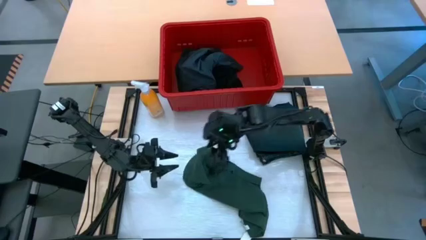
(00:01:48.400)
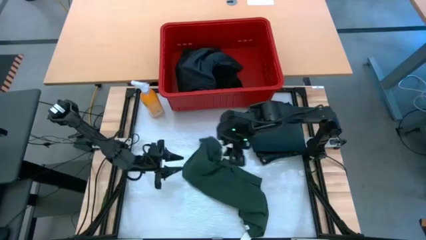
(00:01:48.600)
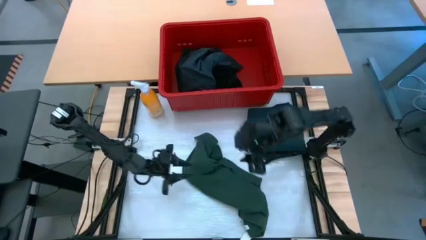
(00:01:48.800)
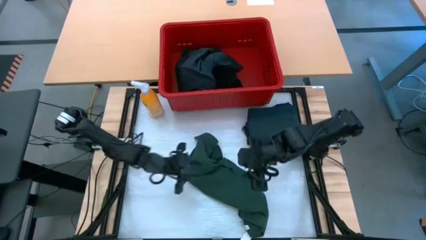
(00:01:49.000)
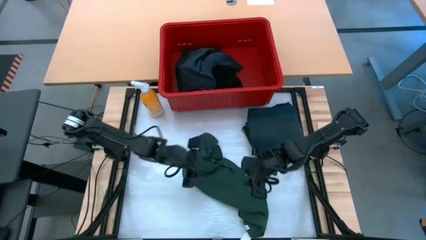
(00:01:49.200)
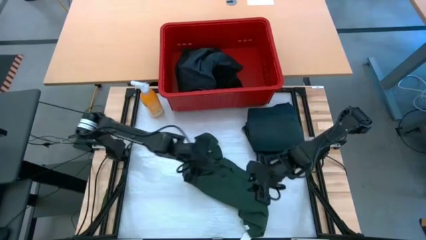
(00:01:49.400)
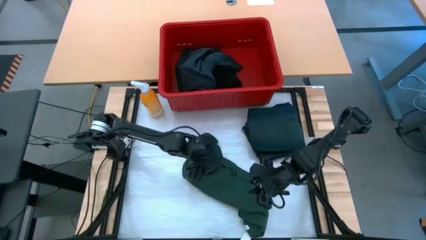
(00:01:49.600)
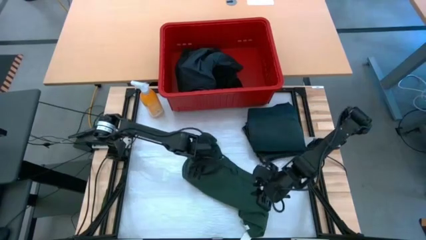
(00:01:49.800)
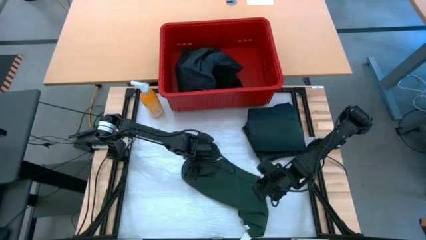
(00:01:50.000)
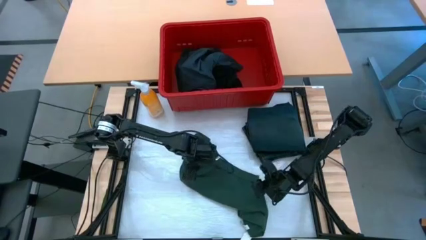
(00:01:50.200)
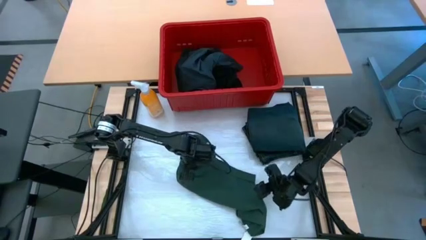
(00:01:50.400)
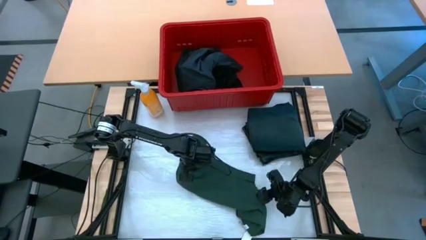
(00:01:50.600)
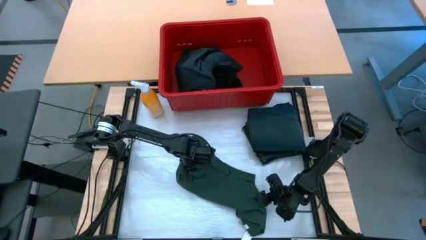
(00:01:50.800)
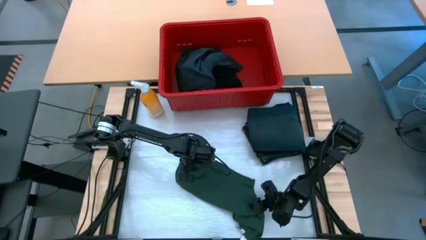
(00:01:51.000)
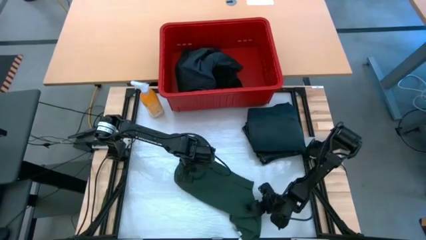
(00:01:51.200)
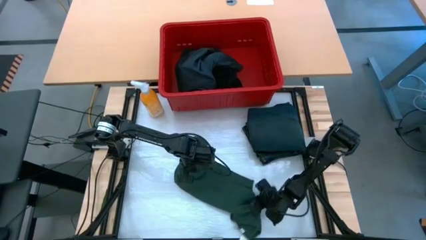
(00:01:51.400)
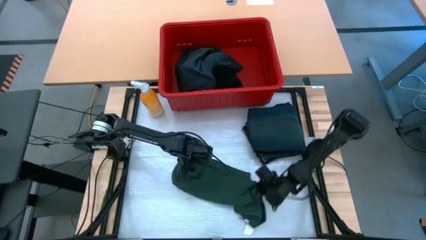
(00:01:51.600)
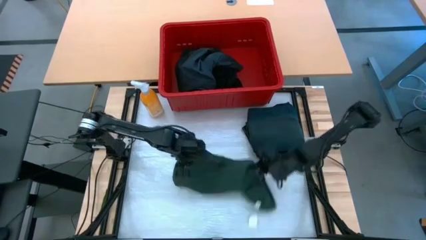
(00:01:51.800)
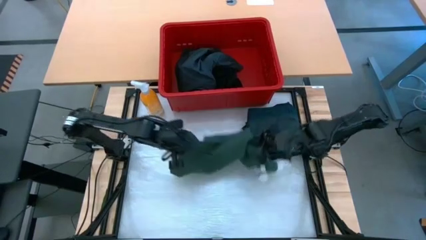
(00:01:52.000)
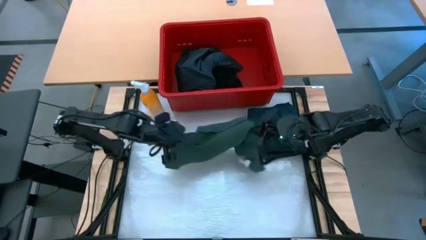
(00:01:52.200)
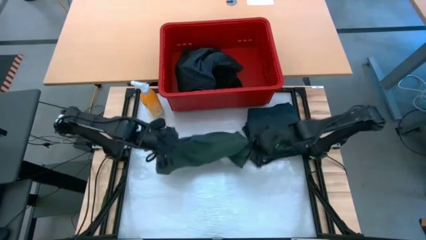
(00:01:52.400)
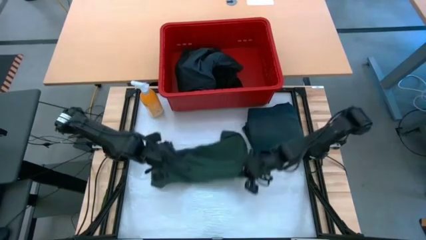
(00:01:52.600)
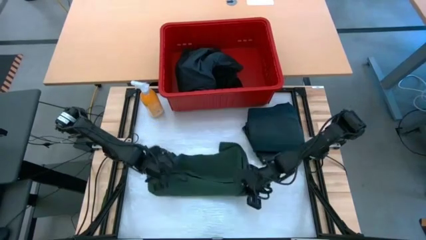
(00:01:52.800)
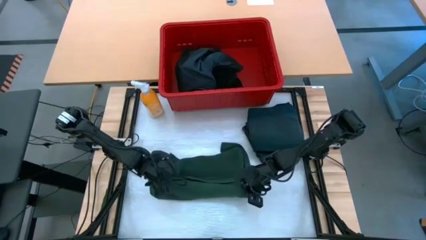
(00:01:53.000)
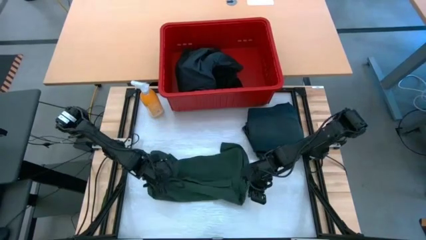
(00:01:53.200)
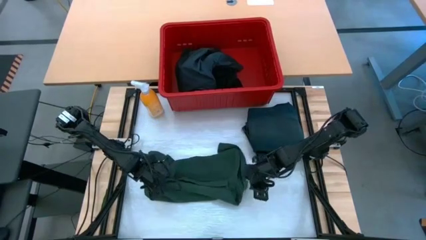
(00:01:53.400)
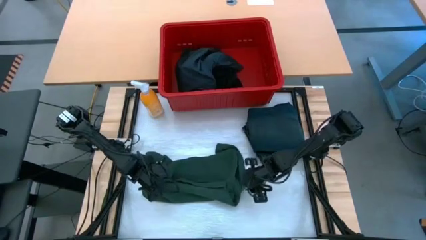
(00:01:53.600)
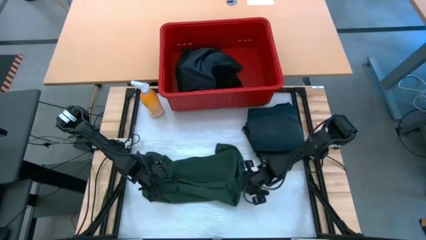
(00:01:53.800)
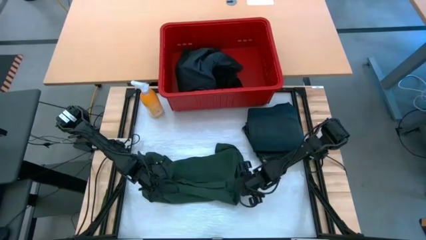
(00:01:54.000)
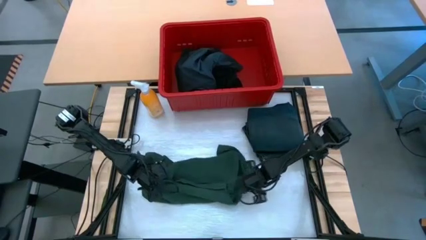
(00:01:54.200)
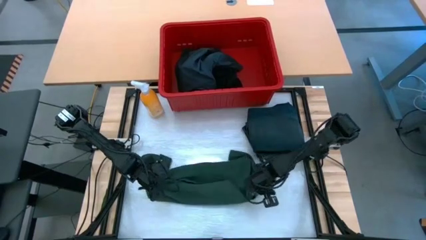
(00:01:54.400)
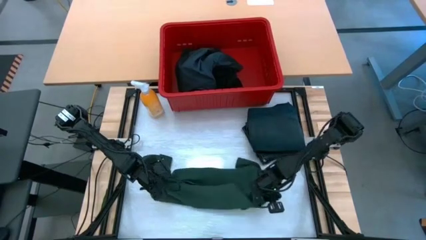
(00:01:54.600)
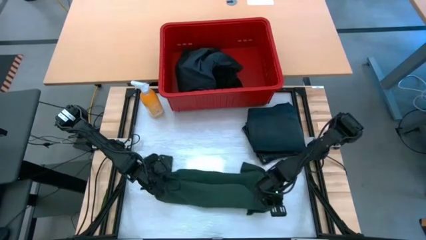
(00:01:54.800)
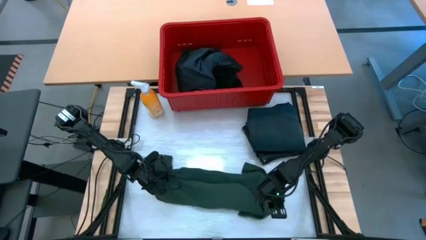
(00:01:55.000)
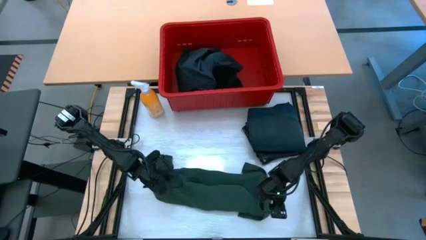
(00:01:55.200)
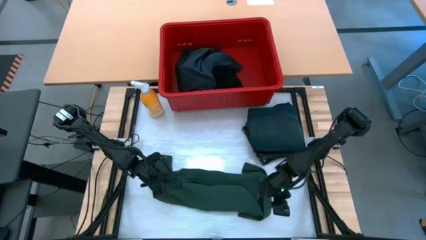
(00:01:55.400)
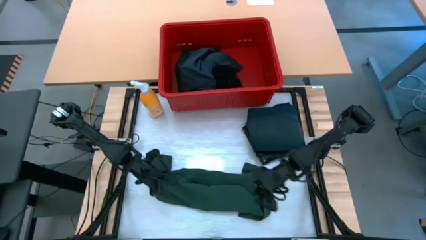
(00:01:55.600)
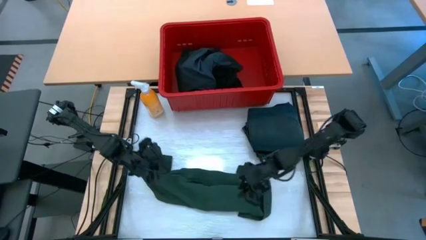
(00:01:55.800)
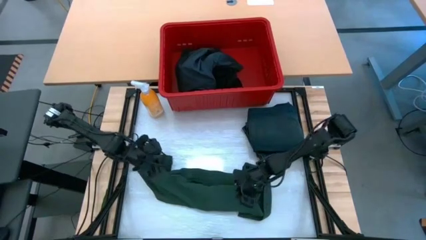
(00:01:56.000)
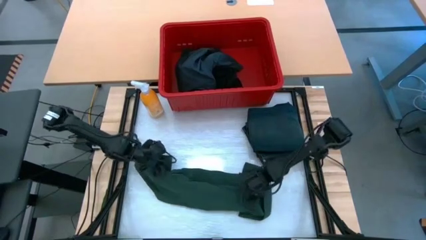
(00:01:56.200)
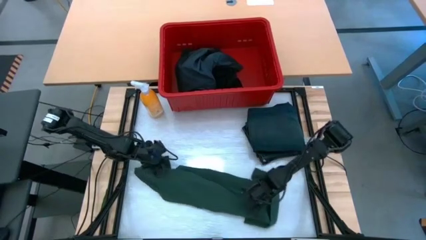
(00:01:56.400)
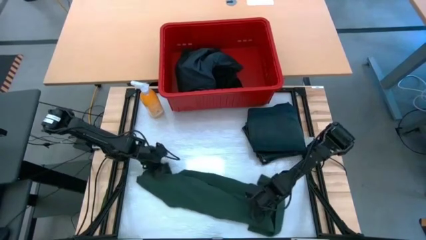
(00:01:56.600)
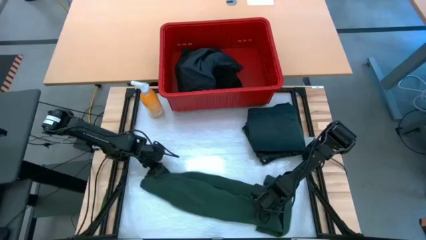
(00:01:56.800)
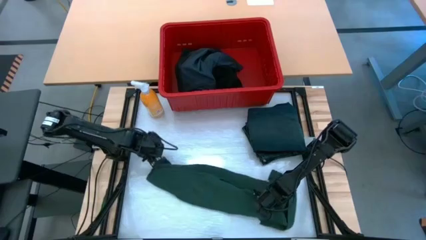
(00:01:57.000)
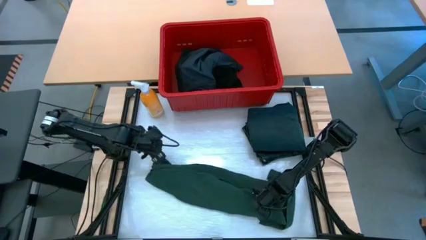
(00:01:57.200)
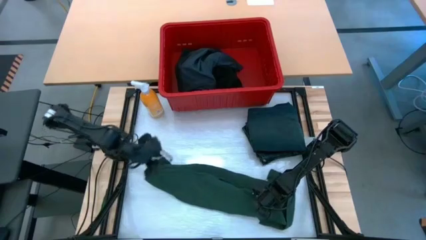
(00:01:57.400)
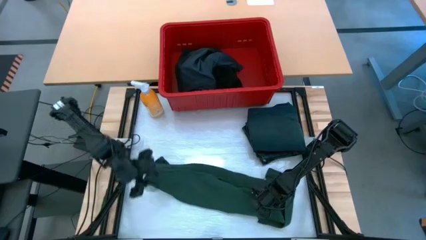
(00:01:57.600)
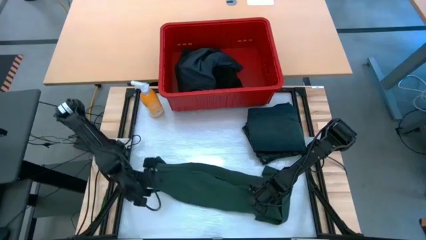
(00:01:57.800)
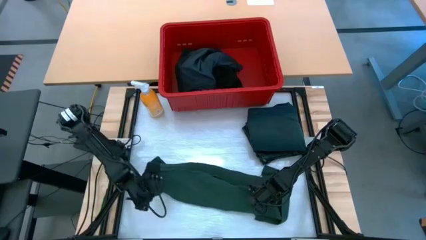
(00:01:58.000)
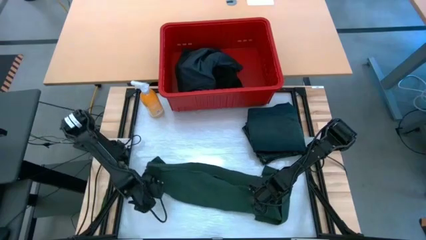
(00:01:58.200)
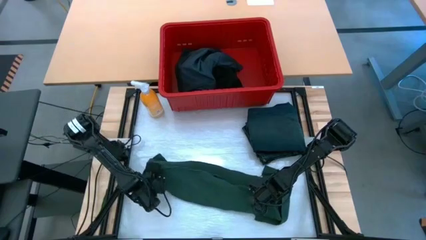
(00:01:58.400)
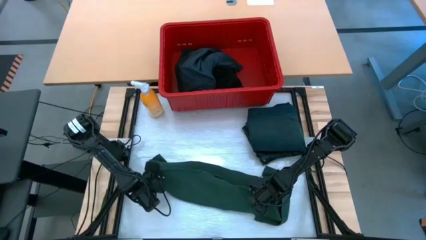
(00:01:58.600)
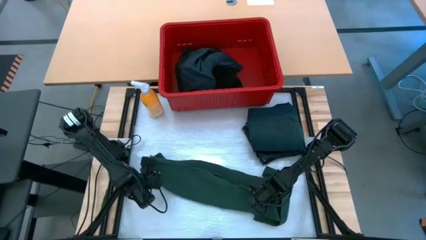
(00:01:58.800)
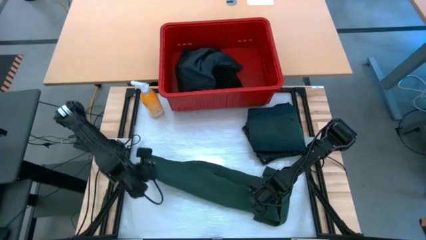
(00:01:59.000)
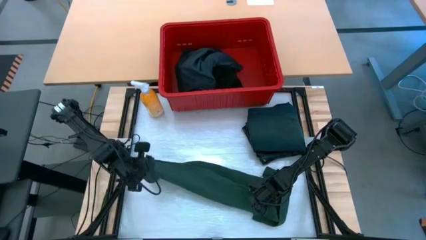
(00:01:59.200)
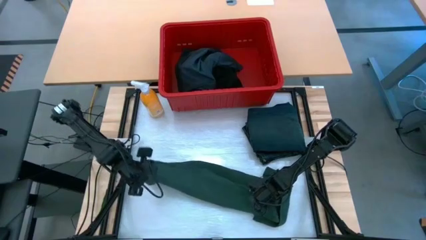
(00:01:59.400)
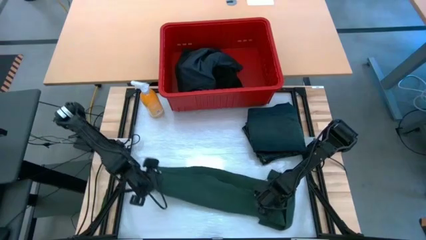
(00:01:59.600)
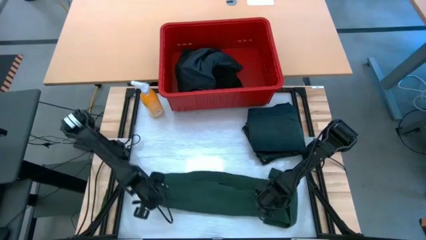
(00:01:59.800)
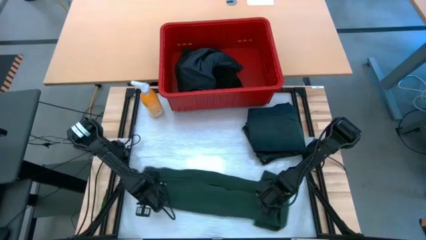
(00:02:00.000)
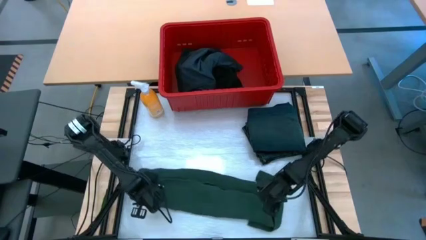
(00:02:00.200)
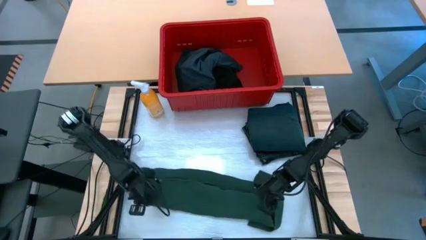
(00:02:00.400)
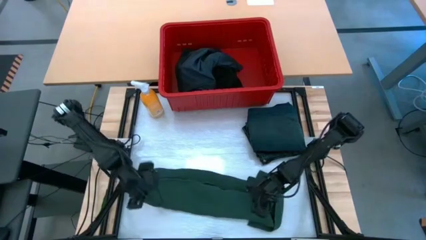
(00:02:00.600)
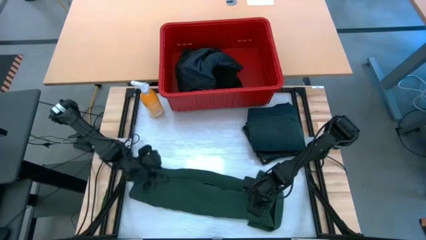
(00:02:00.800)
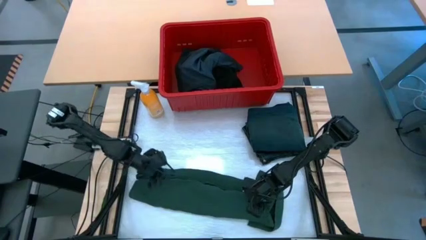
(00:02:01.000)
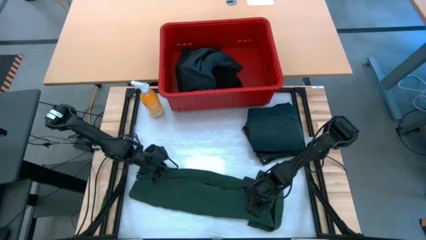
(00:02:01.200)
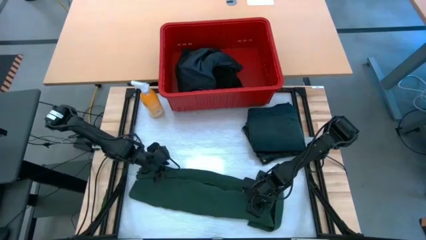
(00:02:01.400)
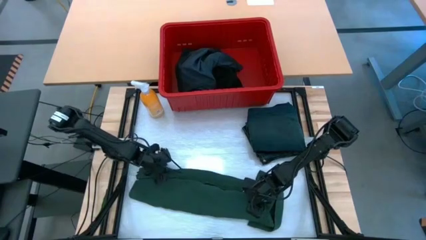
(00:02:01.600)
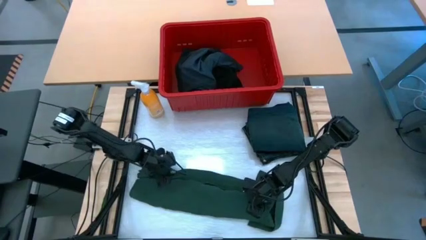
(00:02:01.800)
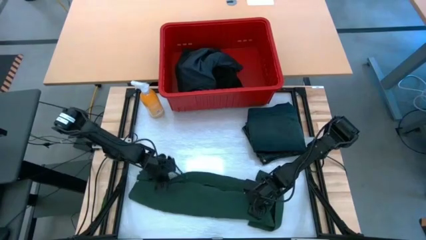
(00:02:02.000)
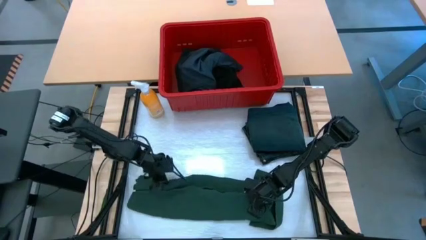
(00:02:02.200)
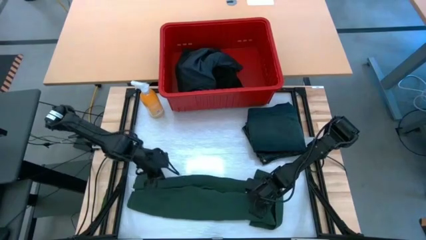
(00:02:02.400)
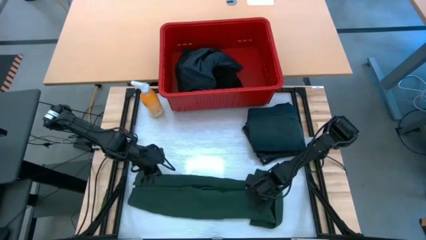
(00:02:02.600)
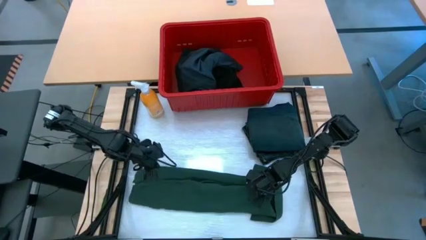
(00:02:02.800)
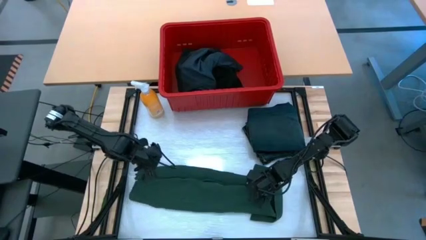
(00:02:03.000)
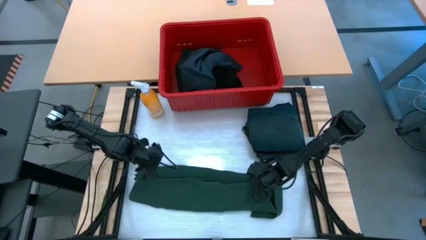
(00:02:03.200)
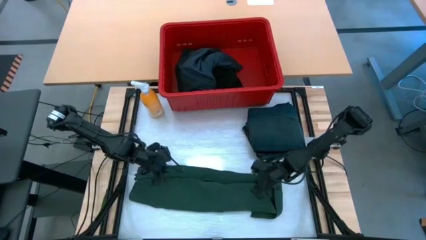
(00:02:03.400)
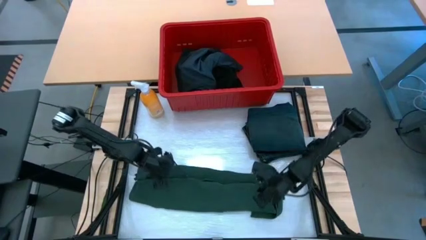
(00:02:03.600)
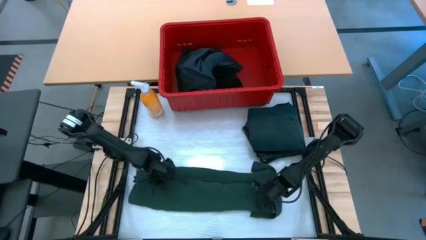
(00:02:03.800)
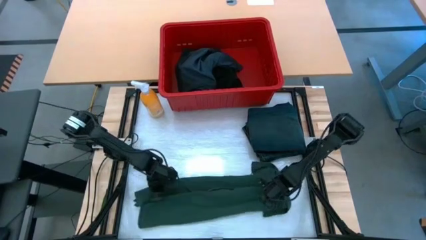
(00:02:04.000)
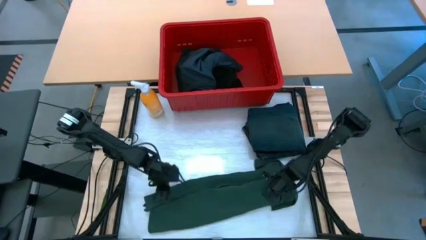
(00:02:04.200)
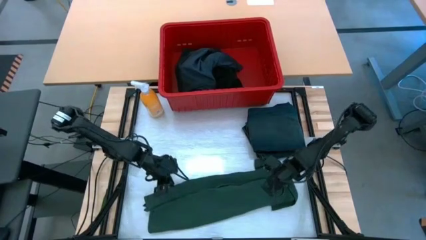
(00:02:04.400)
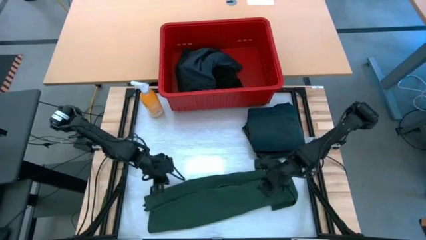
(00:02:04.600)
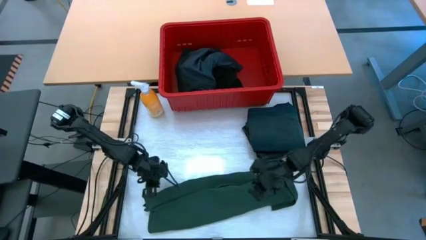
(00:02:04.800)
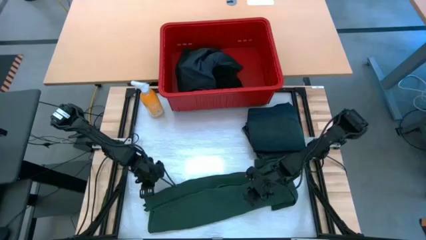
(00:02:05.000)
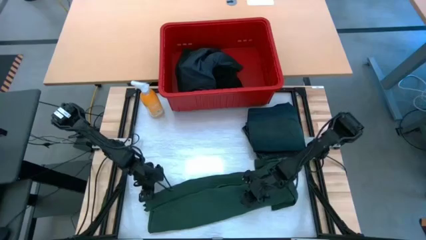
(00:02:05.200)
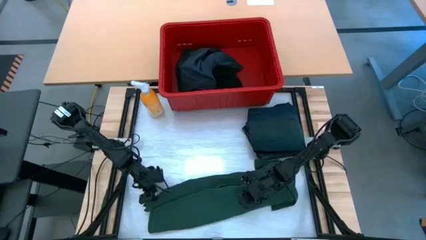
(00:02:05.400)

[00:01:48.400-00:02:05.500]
Task: Fold Laundry from Bin
Fold the green shirt
